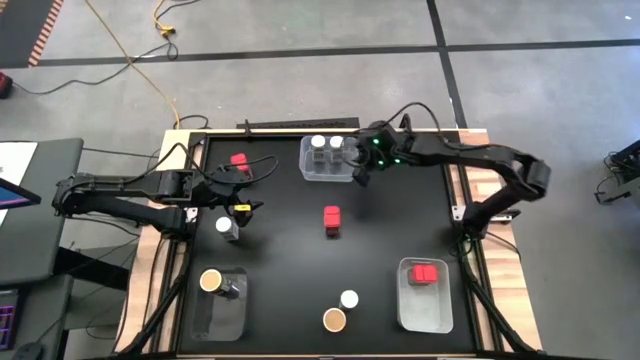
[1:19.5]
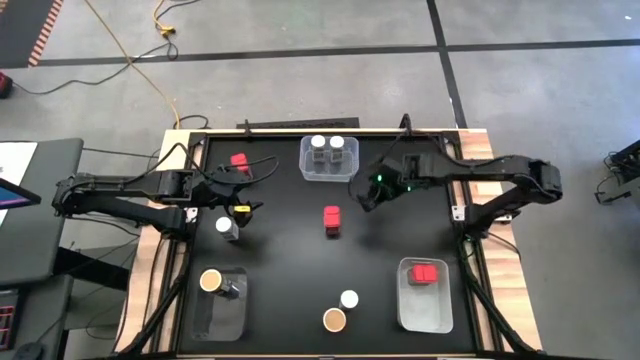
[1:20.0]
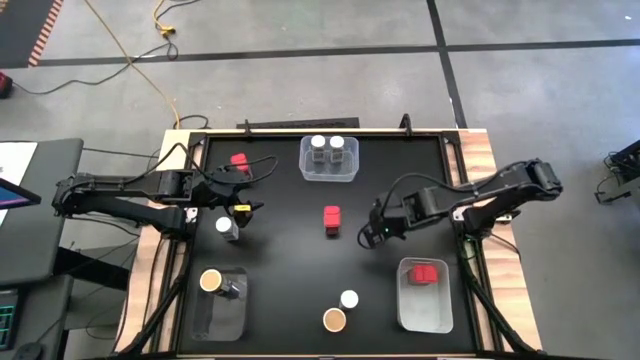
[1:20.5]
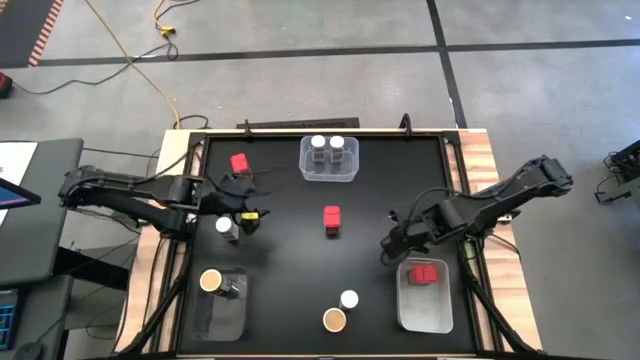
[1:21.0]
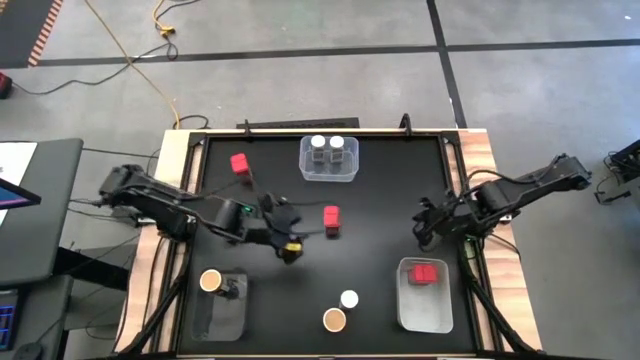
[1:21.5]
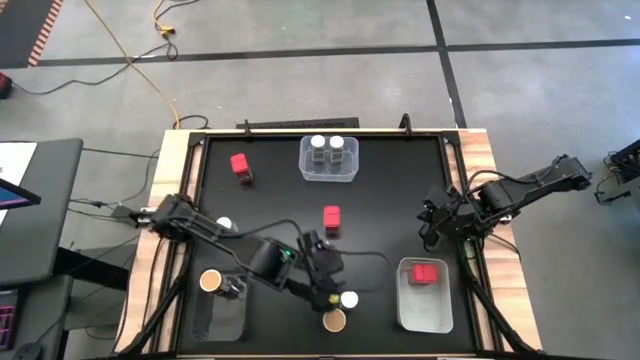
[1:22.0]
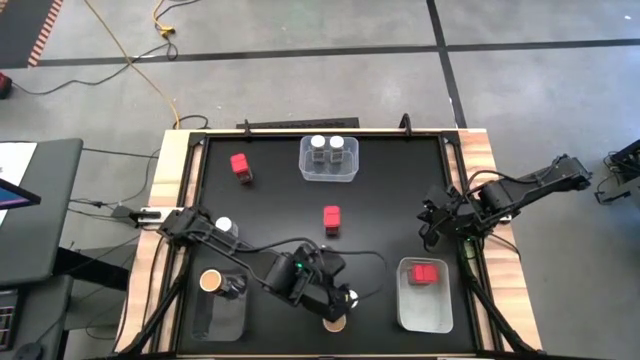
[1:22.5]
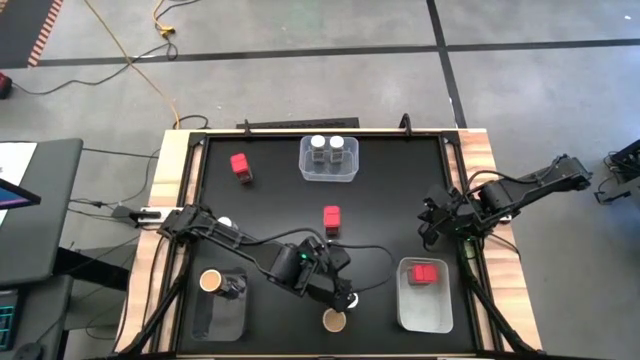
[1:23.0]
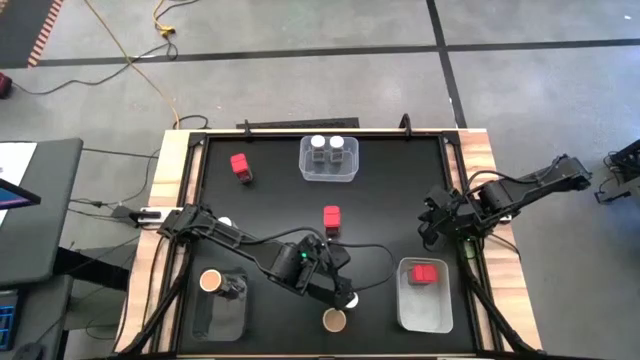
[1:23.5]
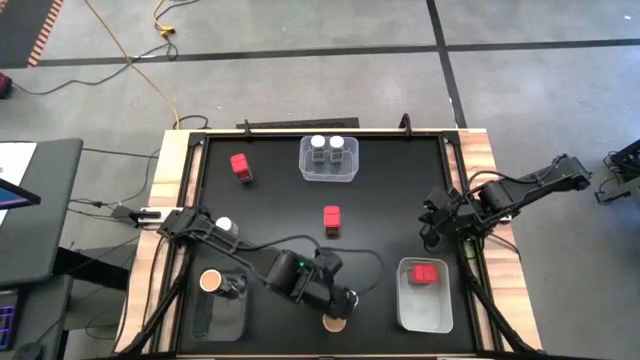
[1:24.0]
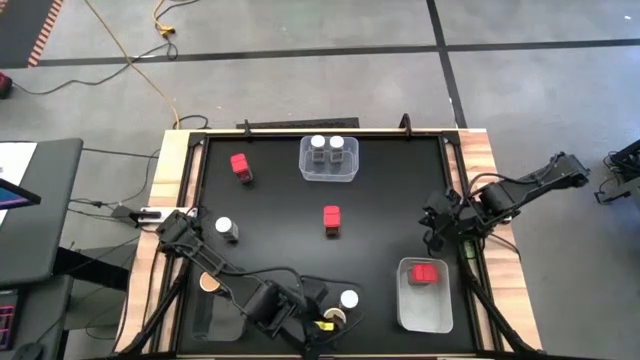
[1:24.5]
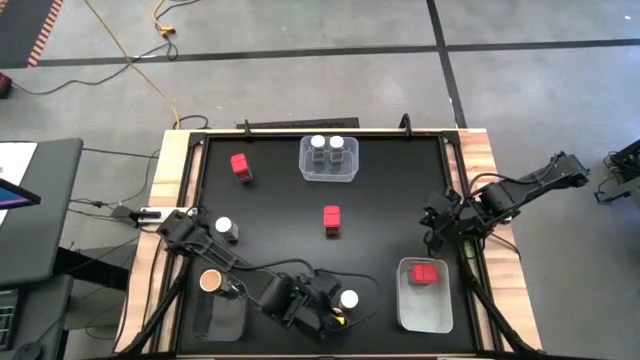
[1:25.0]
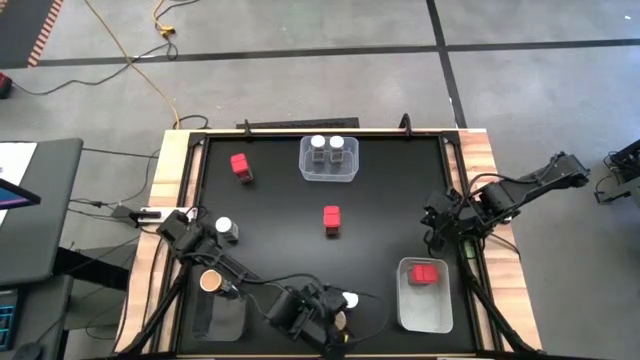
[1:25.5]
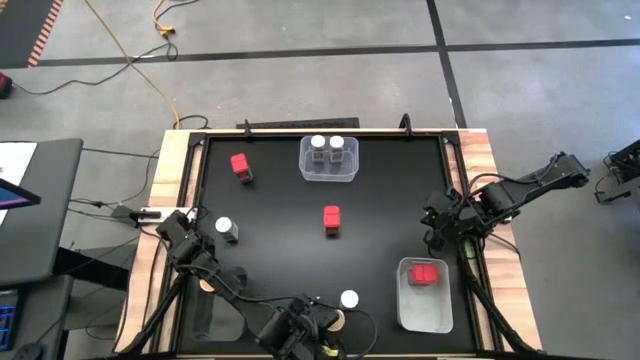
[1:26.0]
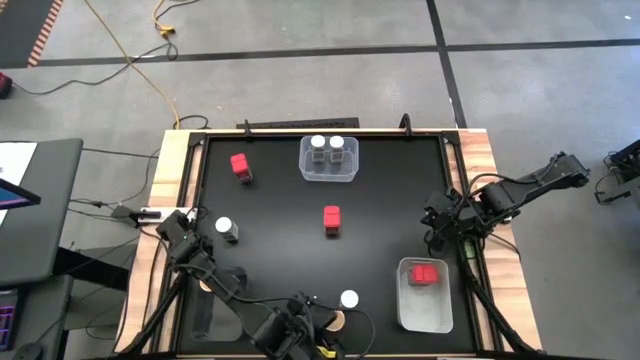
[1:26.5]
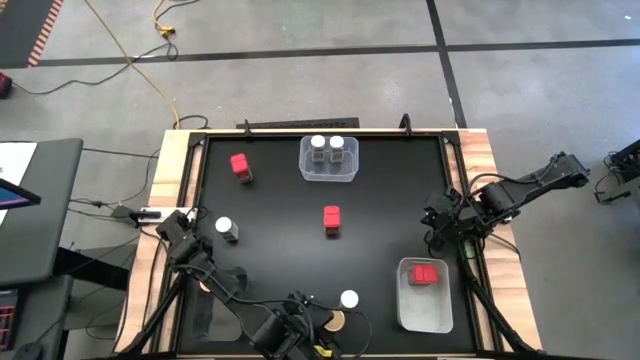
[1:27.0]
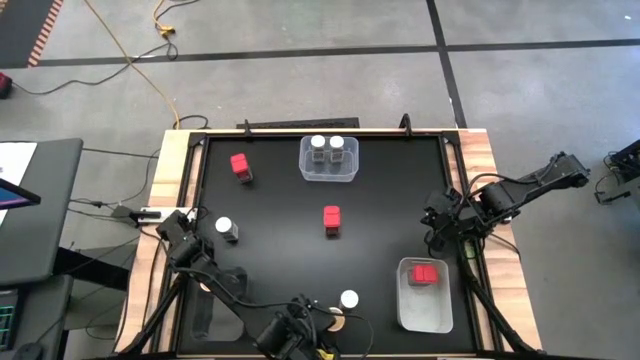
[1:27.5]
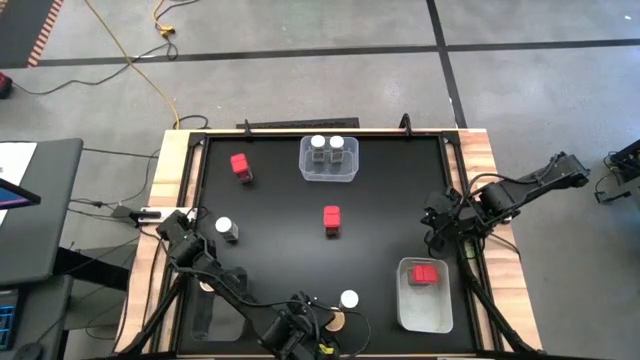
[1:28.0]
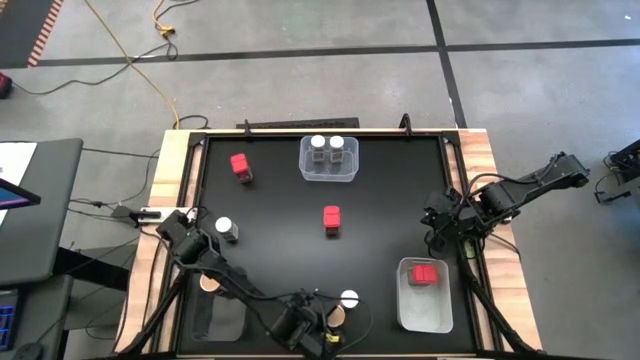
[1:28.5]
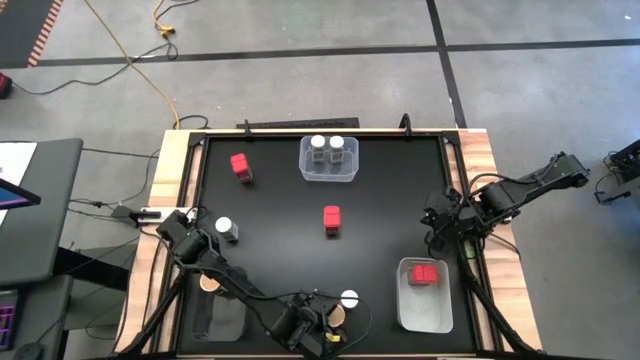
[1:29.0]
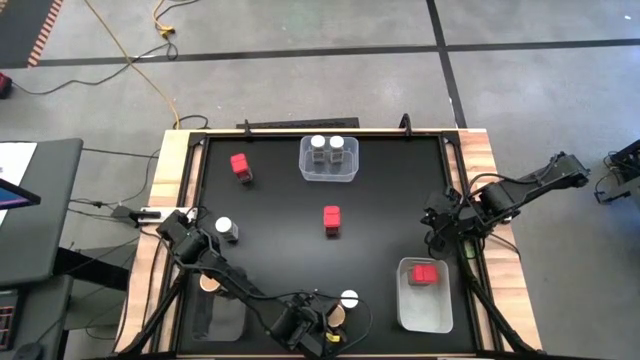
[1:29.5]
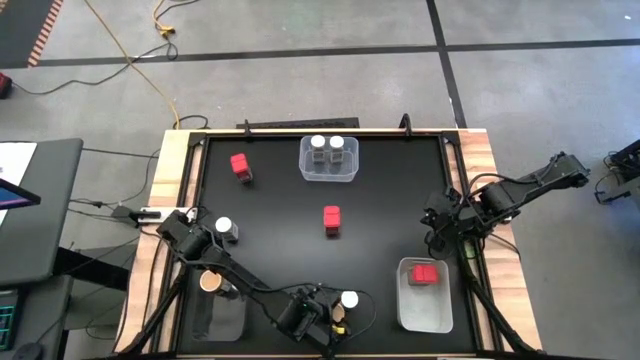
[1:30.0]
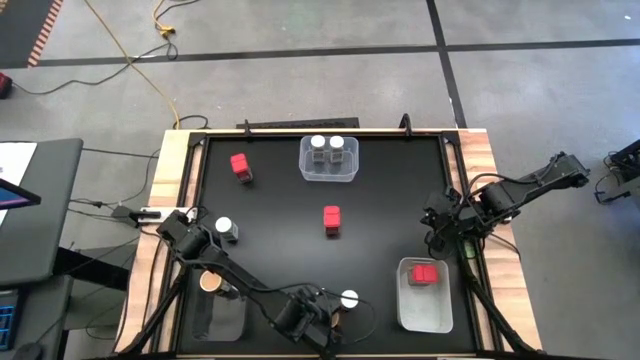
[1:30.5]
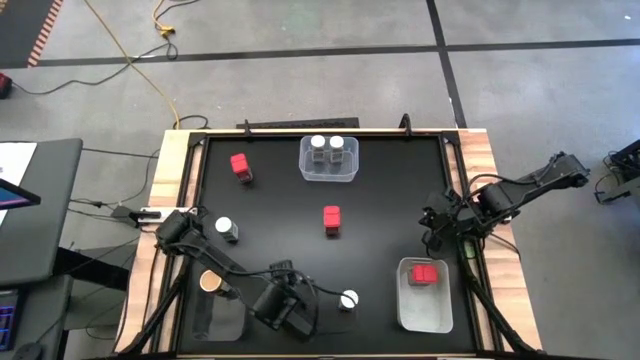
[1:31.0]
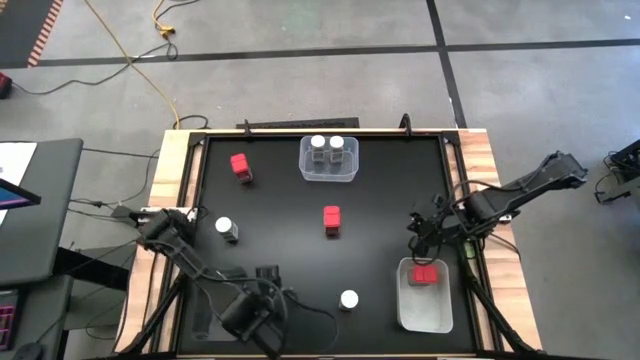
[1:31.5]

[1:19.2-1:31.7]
Task: Sort spices by type
Put the brown spice bottle into the black bin
